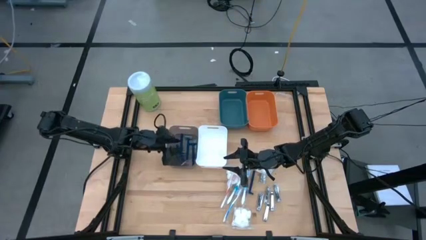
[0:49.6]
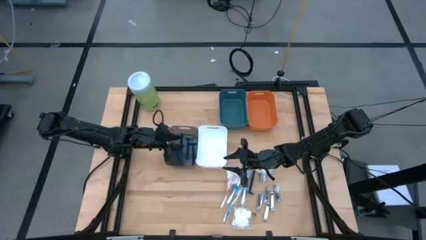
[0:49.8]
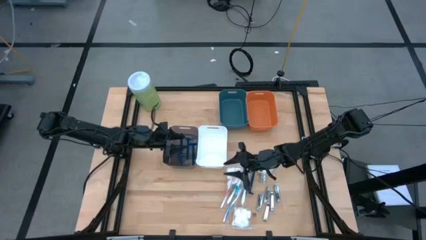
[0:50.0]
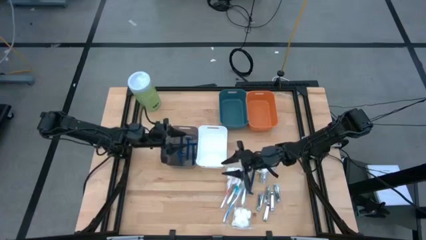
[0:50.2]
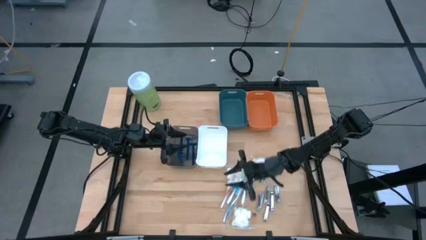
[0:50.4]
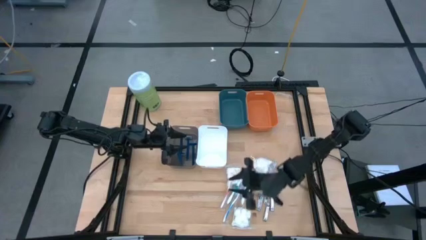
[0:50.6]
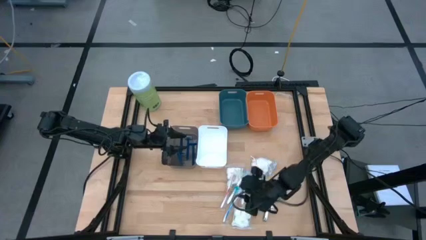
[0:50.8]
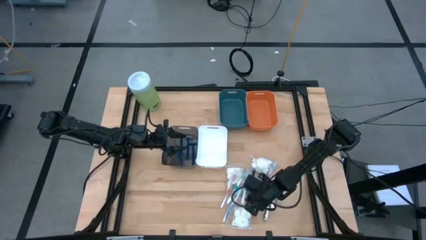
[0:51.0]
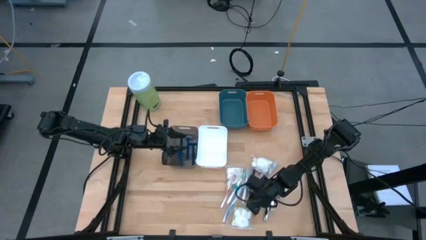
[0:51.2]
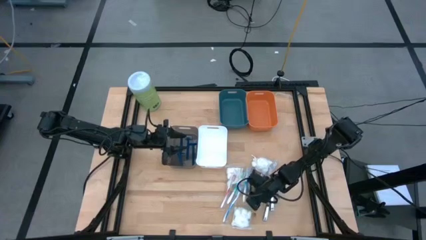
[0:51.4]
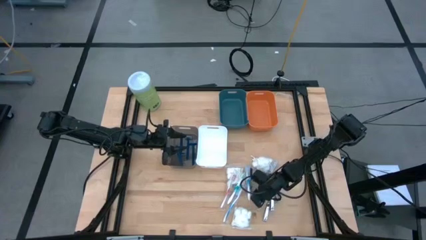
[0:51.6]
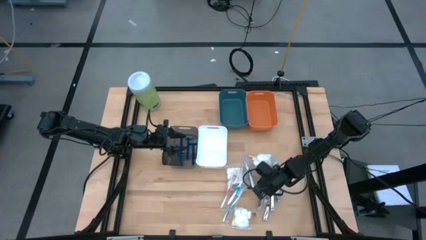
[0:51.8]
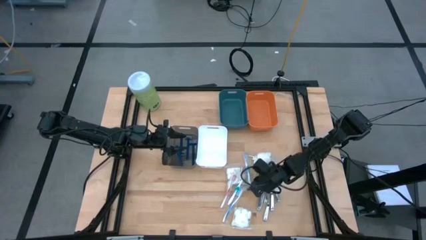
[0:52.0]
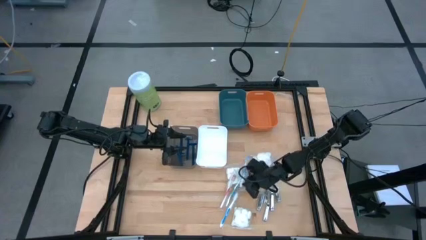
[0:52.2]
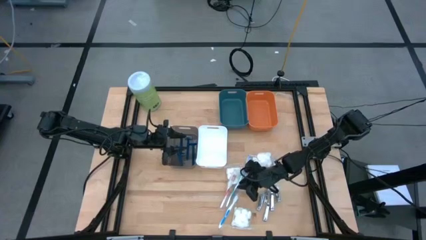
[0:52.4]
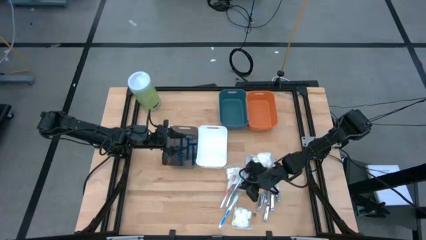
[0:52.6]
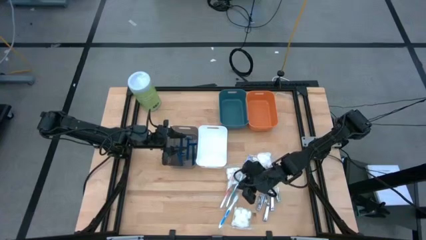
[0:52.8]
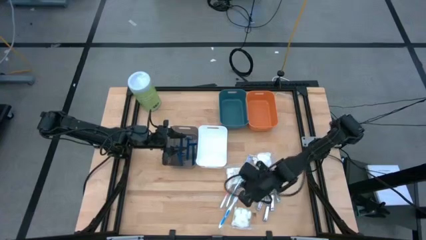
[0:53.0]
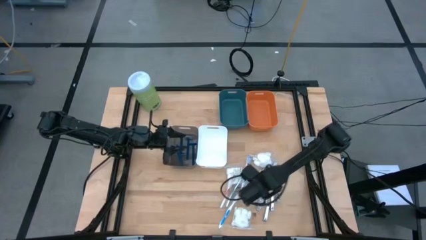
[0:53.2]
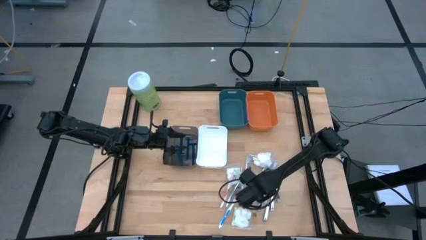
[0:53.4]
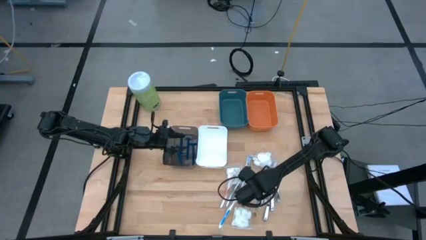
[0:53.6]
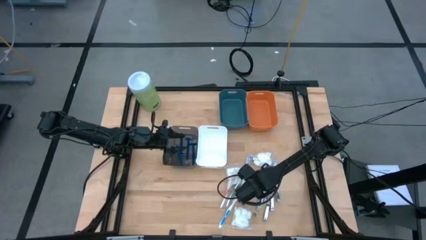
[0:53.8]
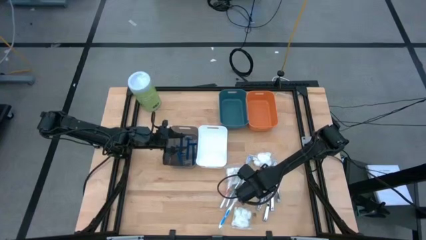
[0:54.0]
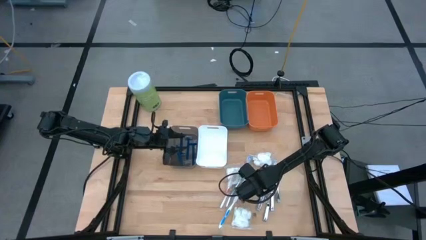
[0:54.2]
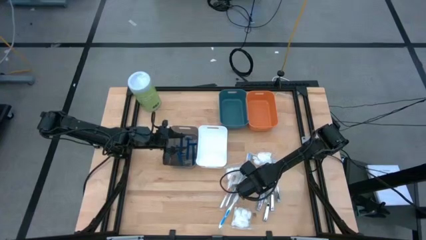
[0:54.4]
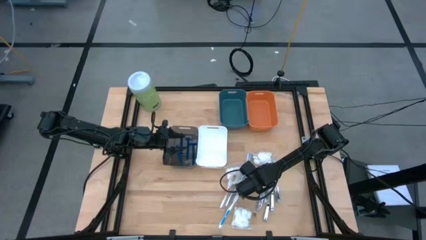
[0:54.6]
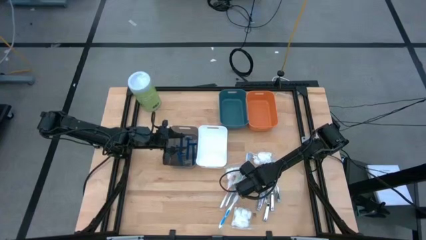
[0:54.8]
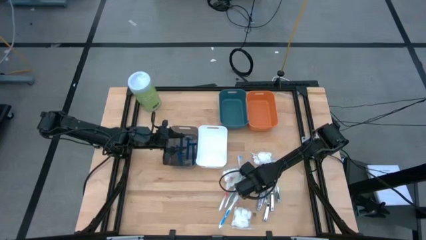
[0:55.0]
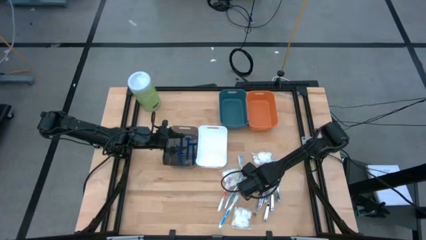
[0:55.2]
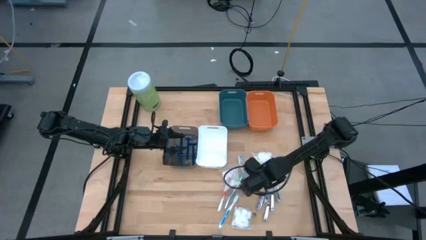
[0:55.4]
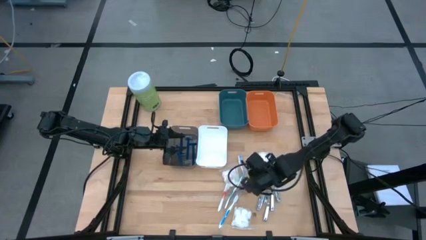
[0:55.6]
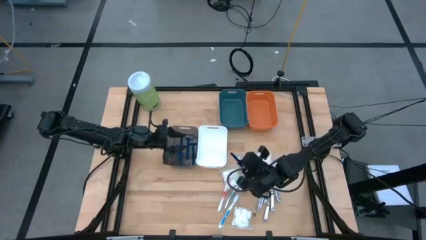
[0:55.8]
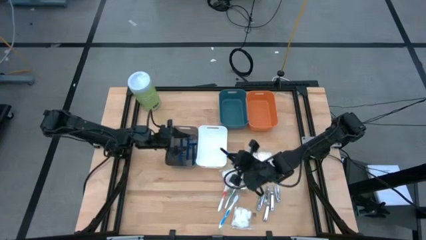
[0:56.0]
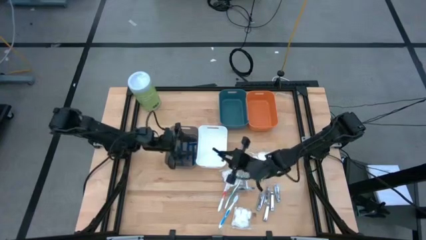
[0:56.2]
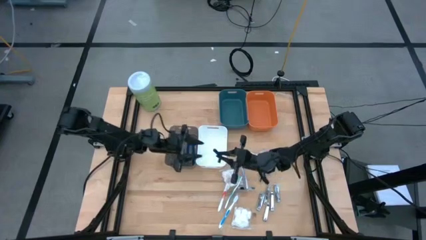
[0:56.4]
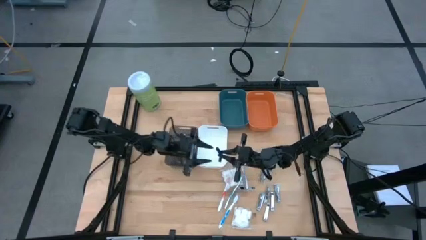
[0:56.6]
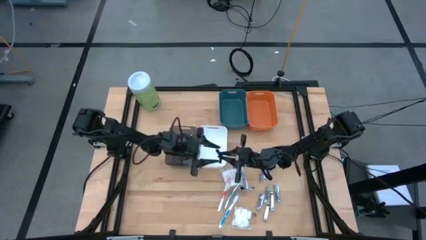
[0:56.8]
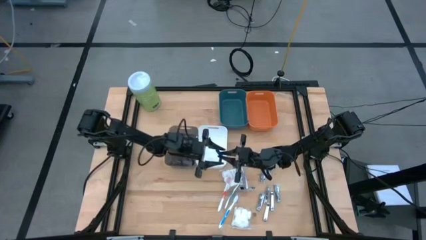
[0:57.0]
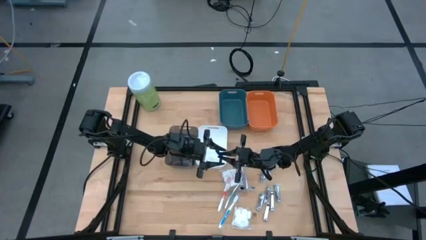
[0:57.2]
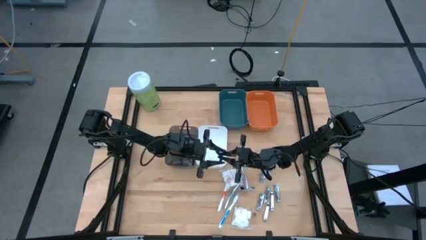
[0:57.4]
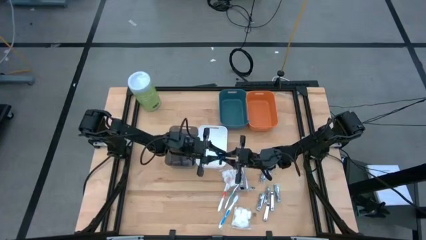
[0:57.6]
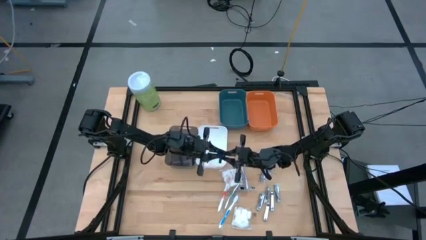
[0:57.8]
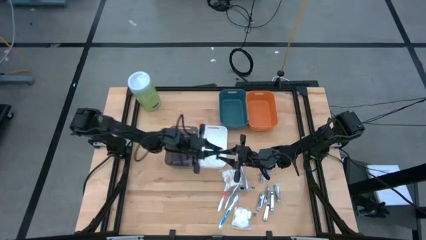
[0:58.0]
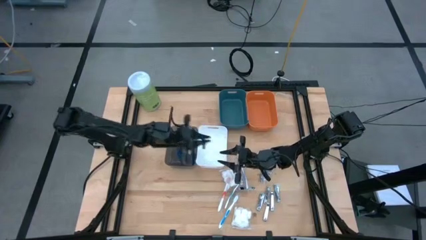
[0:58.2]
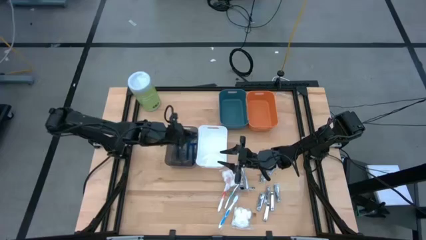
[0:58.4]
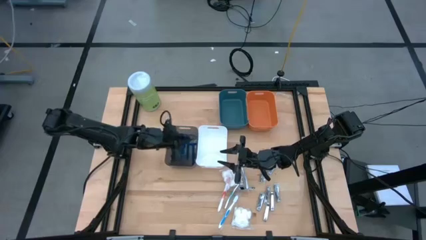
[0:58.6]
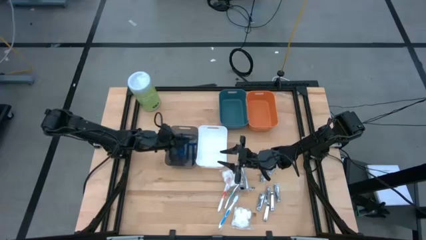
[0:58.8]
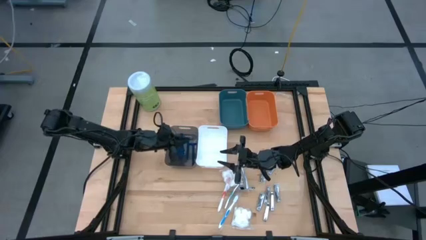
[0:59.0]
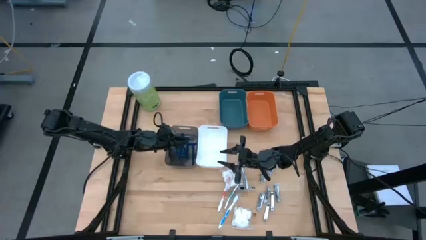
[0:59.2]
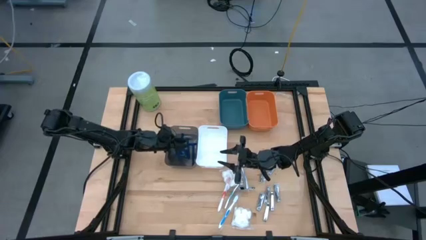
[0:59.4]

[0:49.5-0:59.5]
Task: Pick & Place Travel size toiletries
Put the blue razor into the black bin

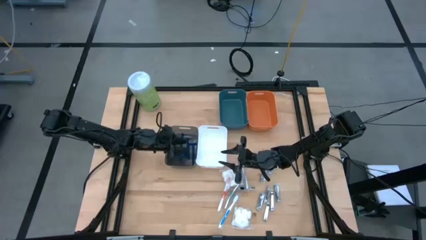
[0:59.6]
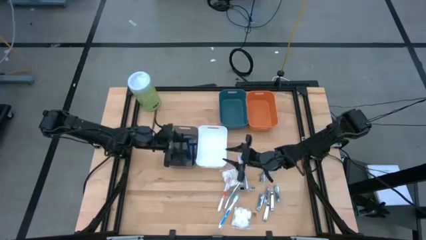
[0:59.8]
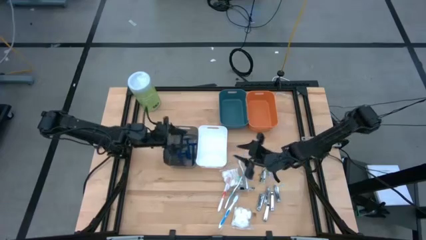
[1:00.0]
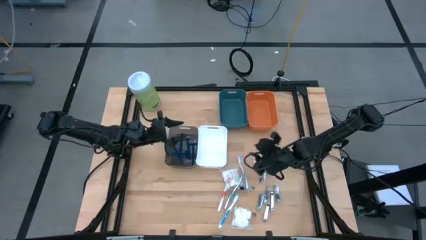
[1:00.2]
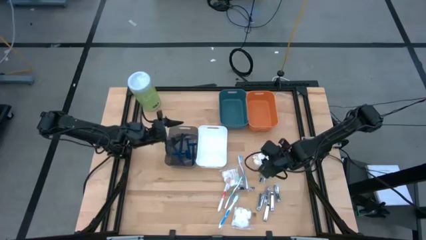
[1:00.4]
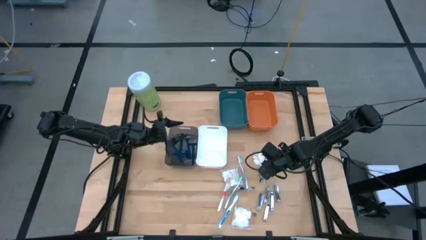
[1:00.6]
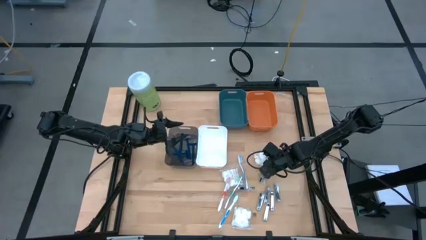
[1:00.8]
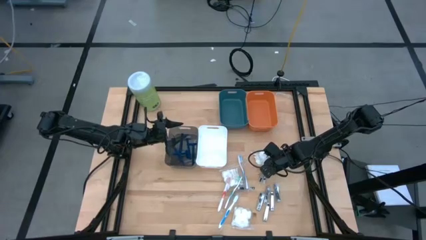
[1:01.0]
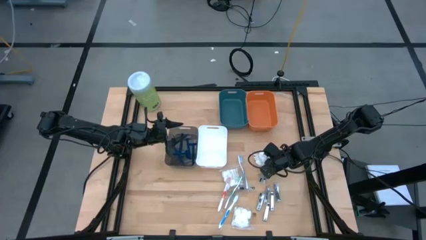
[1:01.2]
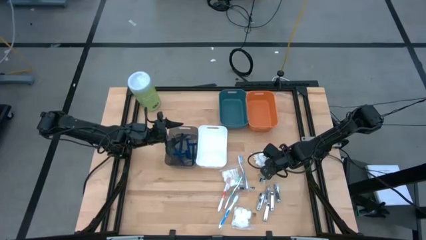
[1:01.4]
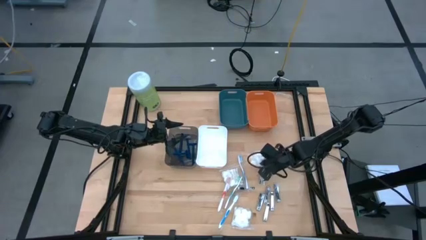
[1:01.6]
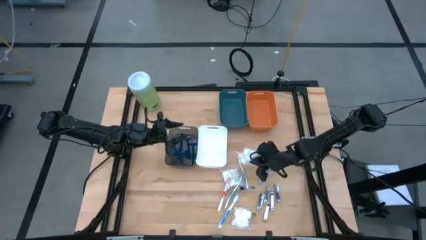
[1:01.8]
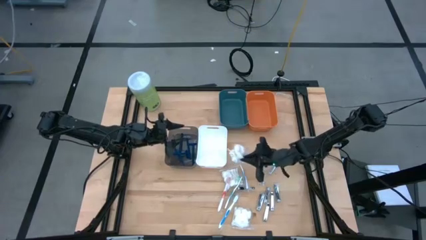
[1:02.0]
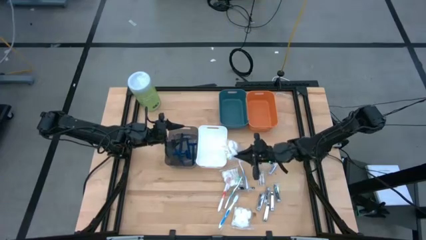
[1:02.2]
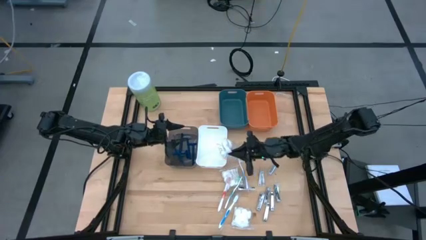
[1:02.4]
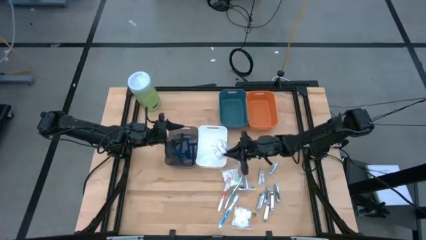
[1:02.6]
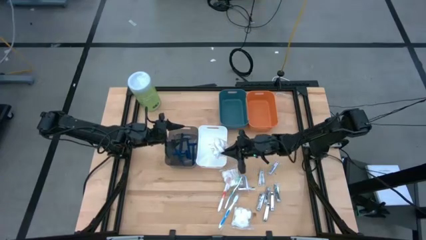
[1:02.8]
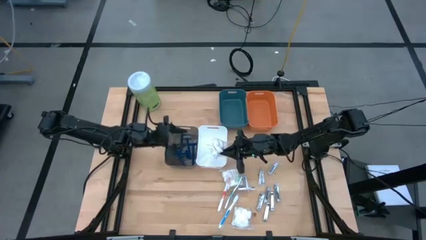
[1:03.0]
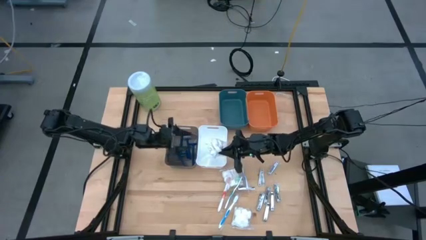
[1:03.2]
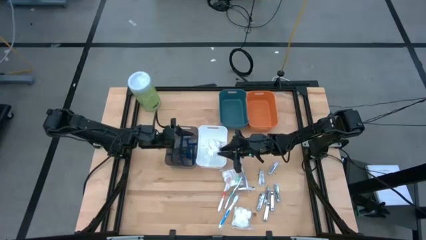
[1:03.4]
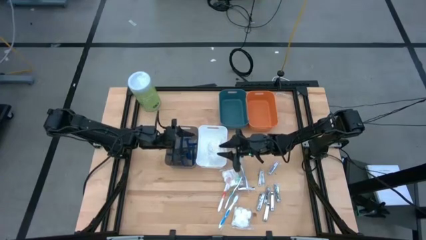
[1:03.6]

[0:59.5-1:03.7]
Put the cotton pack into the white bin

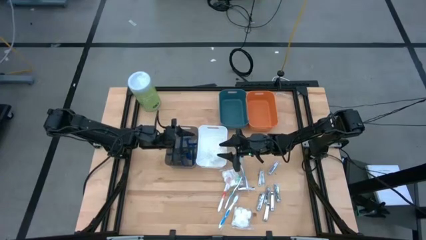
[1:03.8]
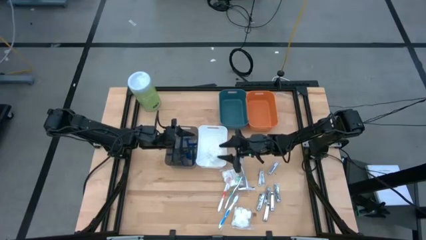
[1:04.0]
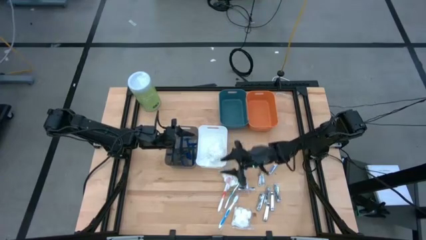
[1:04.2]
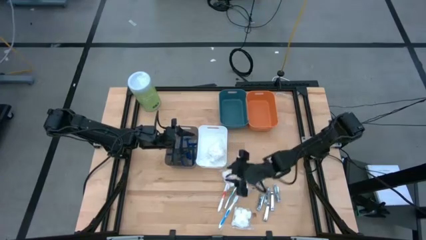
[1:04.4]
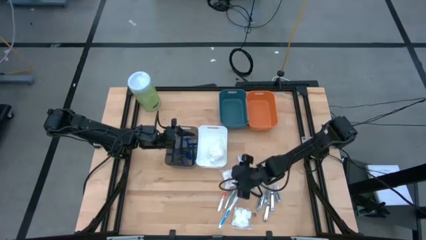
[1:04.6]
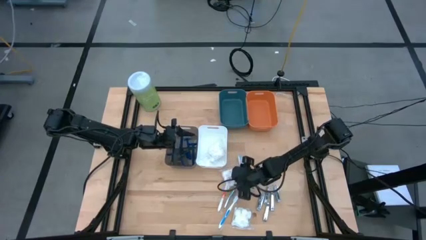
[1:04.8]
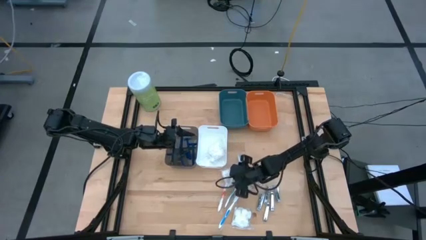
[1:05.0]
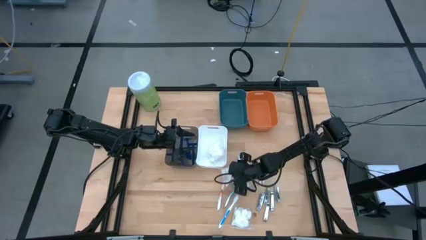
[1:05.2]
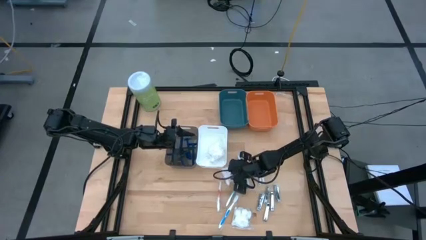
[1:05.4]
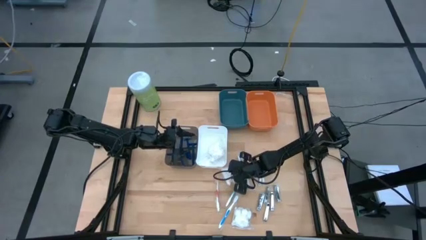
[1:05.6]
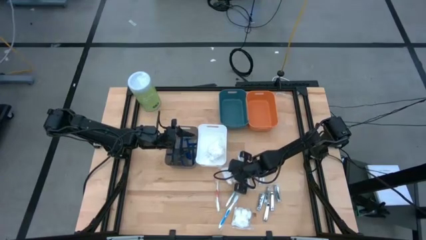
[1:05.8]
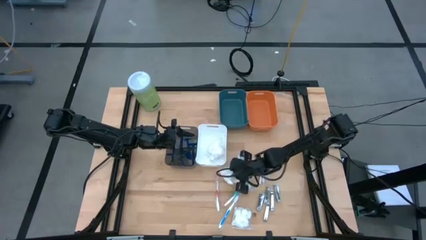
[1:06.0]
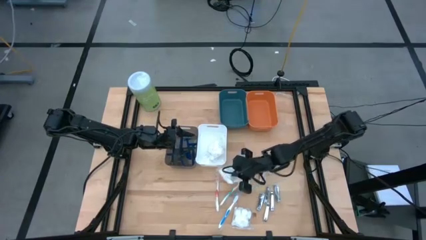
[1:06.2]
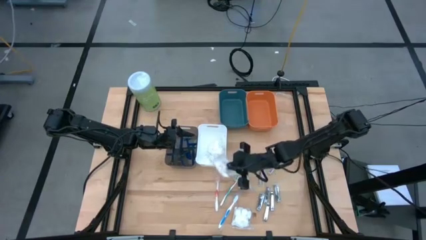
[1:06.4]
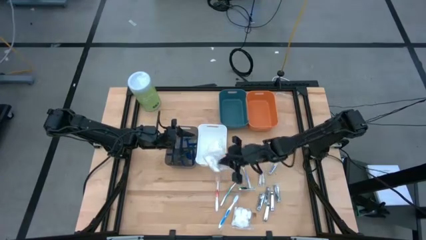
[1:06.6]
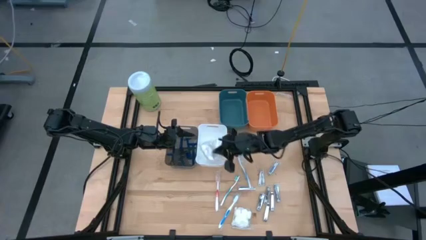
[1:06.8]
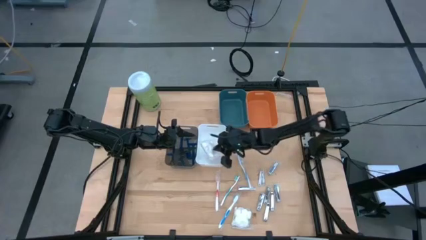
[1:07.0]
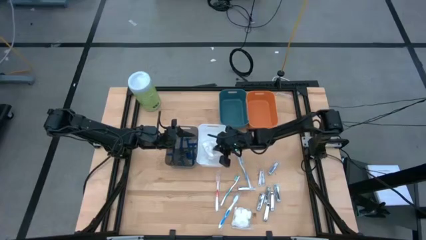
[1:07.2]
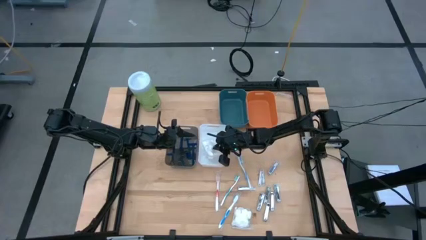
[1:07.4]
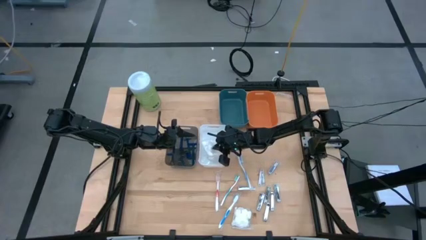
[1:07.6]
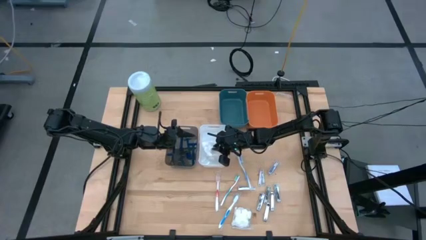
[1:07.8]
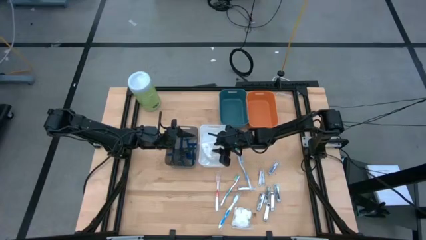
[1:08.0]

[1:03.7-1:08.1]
Put the cotton pack into the white bin
